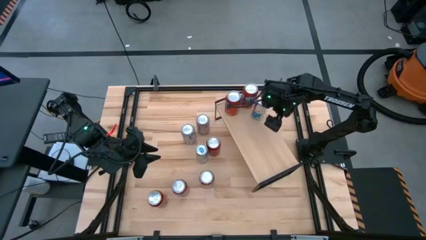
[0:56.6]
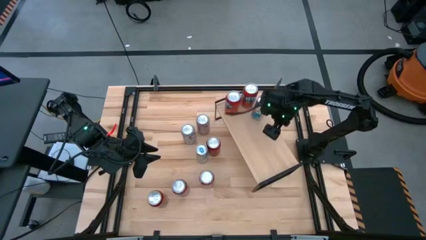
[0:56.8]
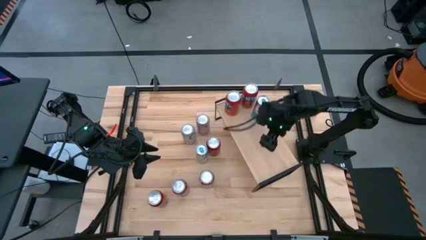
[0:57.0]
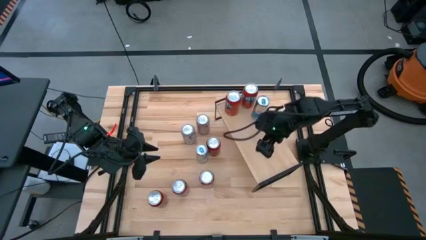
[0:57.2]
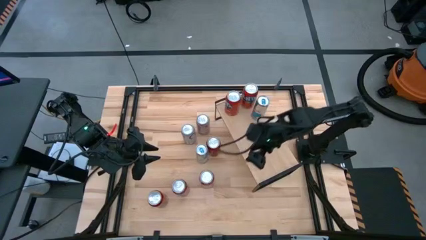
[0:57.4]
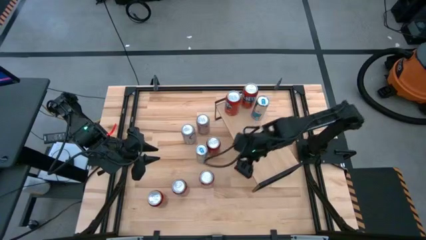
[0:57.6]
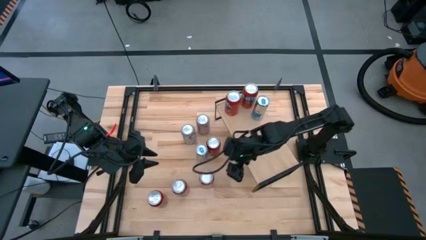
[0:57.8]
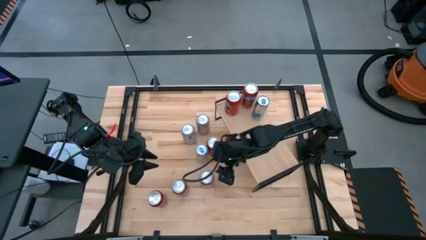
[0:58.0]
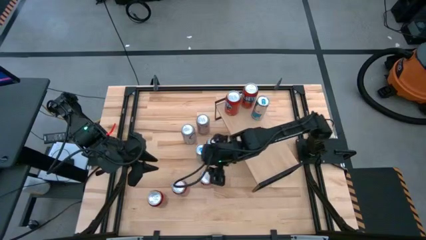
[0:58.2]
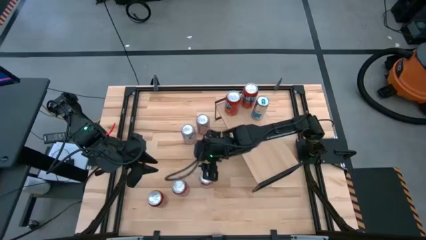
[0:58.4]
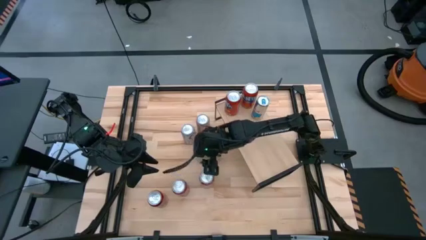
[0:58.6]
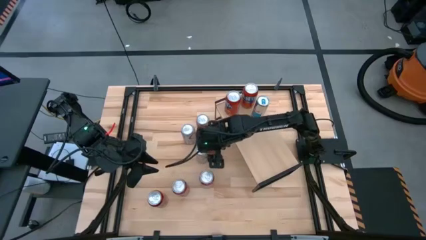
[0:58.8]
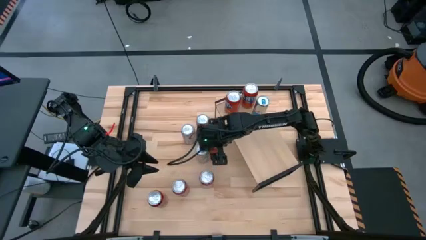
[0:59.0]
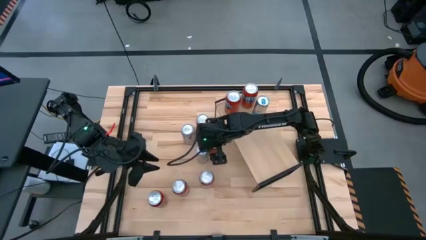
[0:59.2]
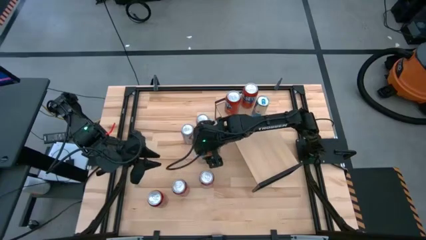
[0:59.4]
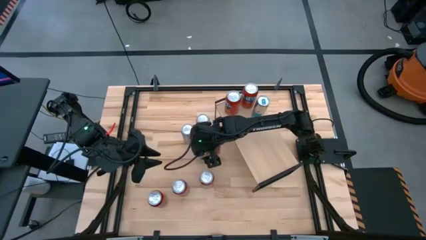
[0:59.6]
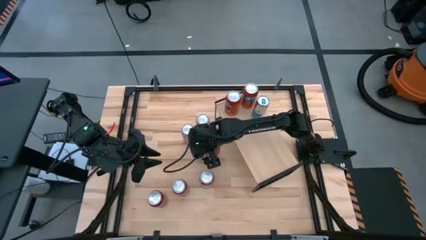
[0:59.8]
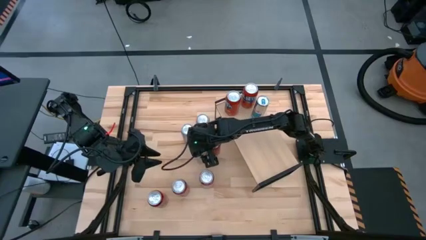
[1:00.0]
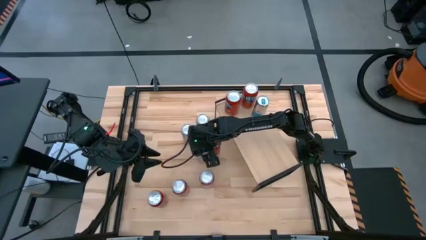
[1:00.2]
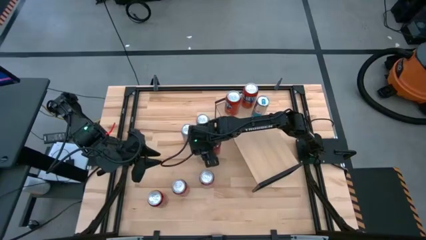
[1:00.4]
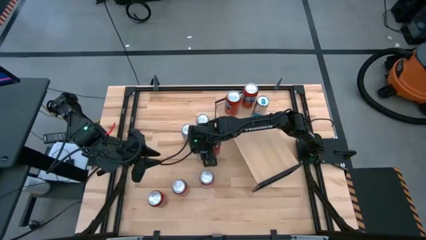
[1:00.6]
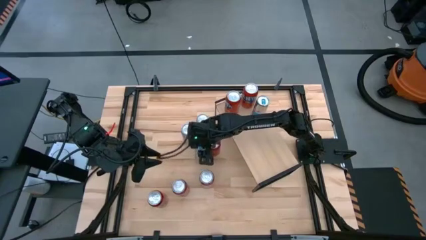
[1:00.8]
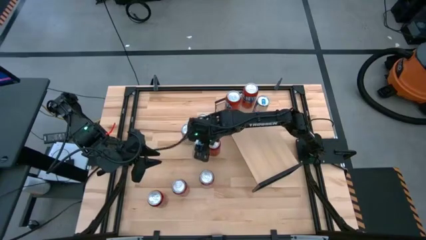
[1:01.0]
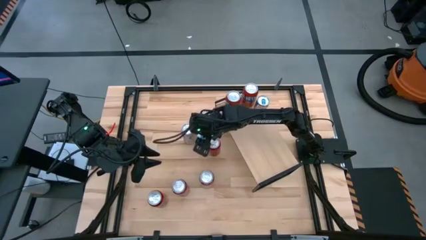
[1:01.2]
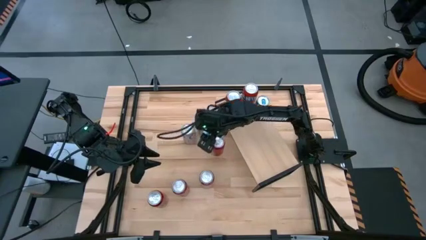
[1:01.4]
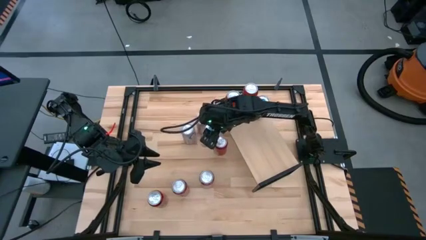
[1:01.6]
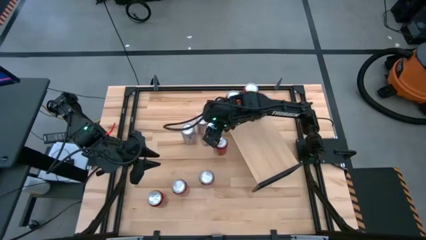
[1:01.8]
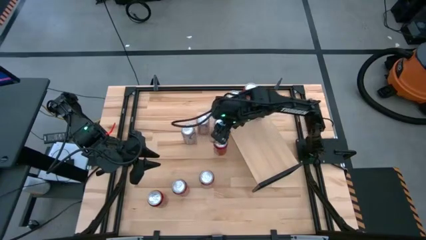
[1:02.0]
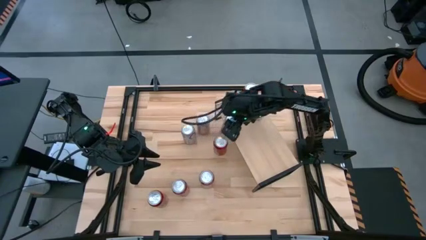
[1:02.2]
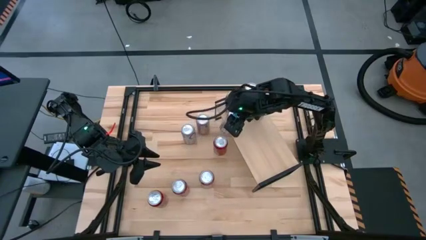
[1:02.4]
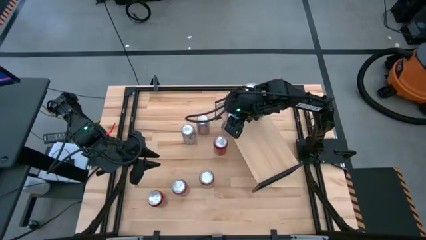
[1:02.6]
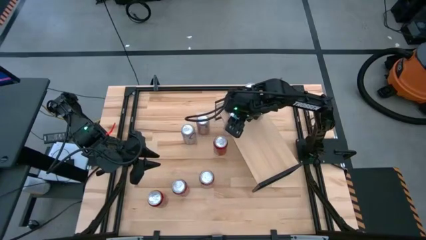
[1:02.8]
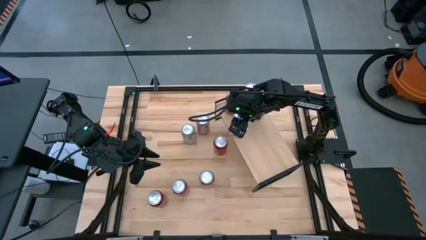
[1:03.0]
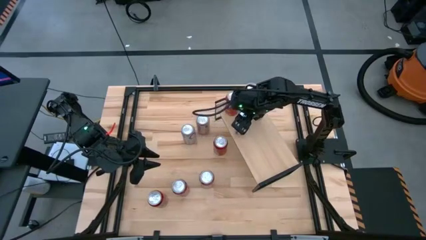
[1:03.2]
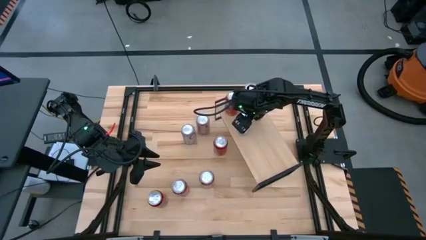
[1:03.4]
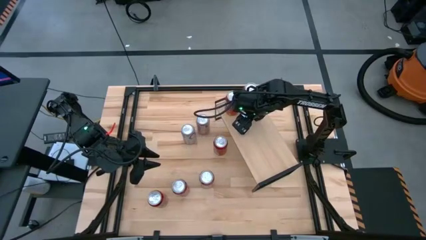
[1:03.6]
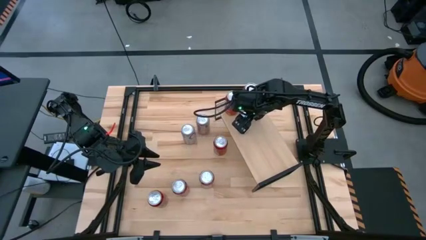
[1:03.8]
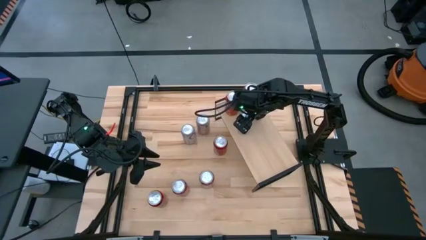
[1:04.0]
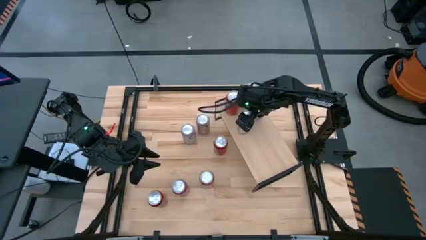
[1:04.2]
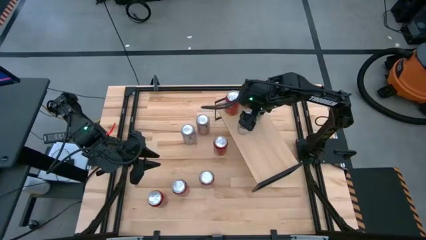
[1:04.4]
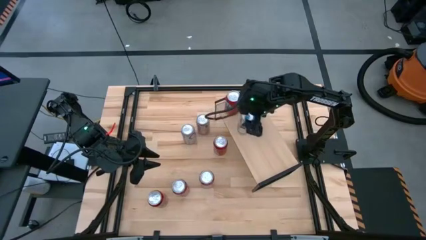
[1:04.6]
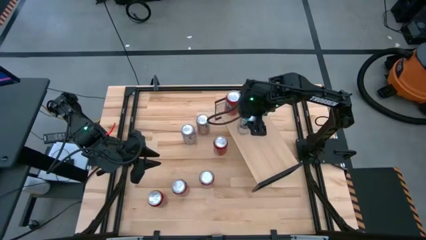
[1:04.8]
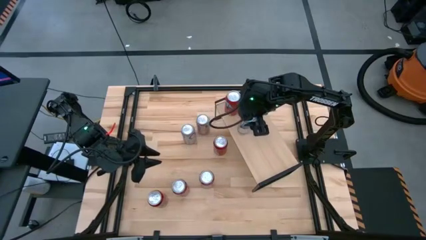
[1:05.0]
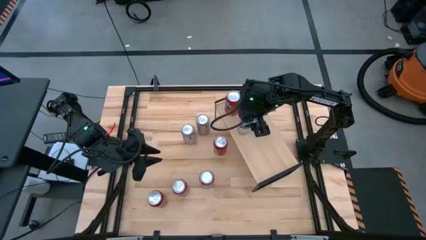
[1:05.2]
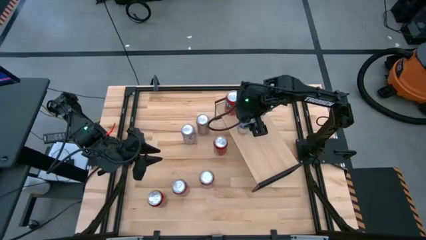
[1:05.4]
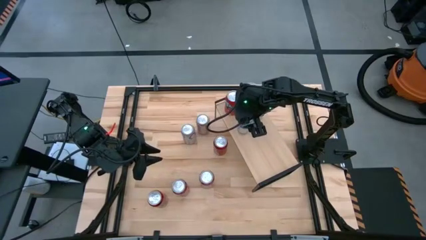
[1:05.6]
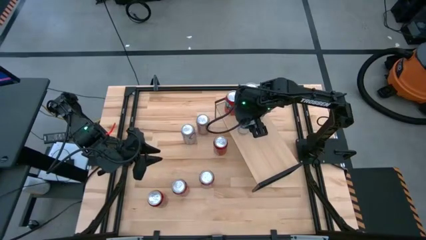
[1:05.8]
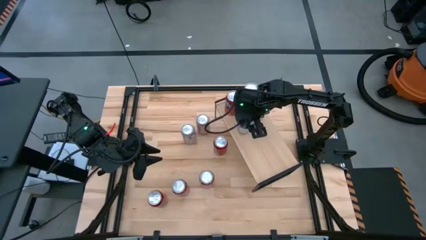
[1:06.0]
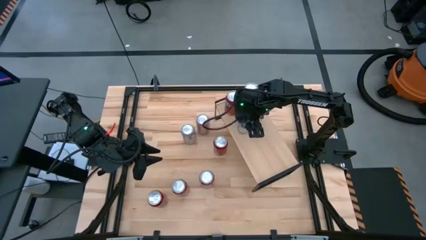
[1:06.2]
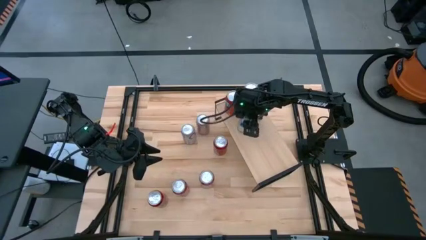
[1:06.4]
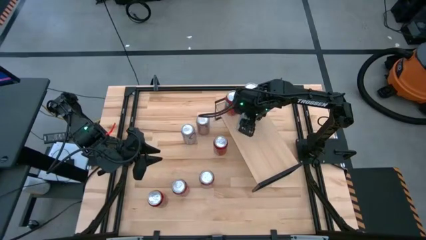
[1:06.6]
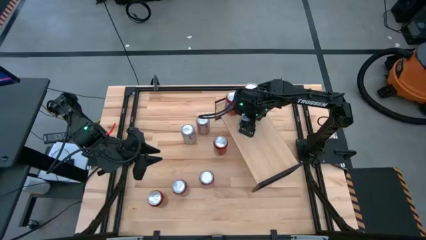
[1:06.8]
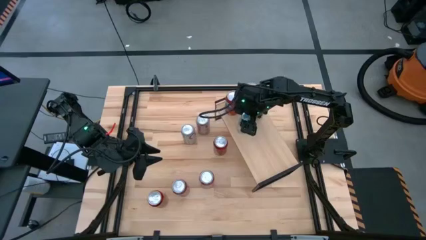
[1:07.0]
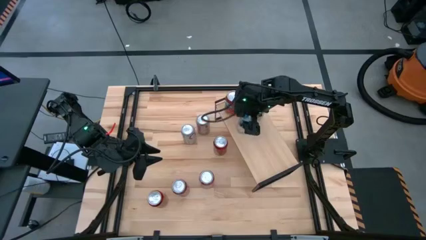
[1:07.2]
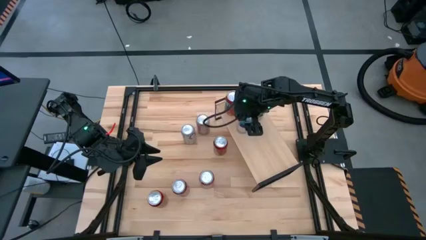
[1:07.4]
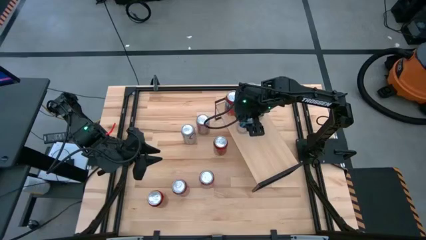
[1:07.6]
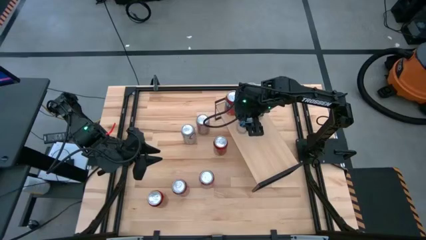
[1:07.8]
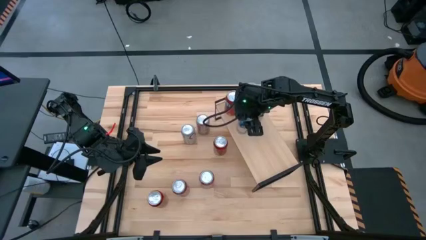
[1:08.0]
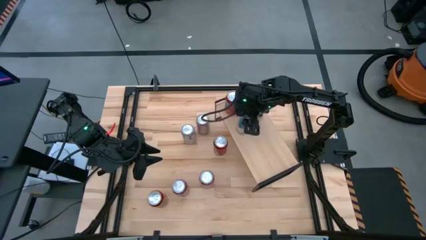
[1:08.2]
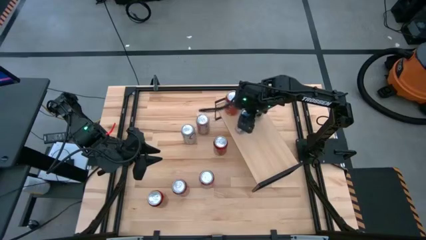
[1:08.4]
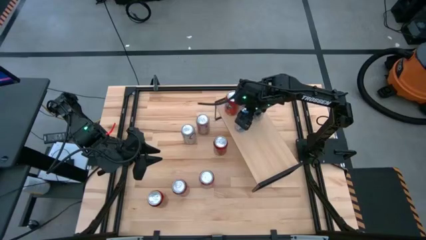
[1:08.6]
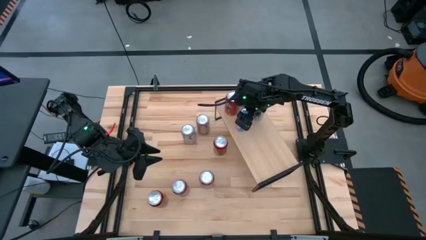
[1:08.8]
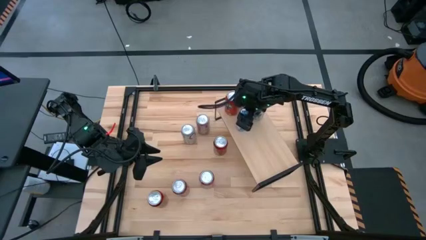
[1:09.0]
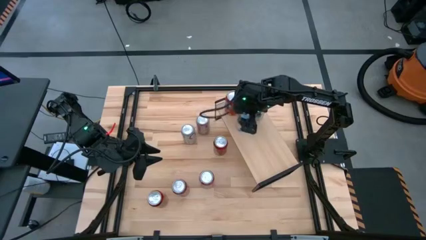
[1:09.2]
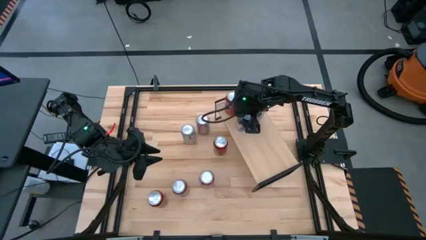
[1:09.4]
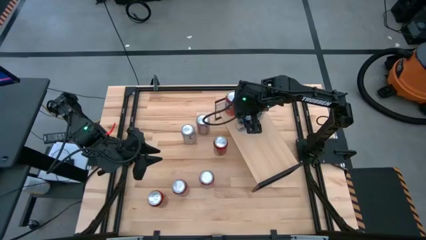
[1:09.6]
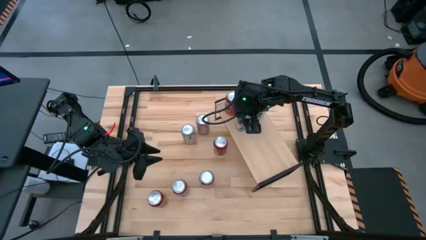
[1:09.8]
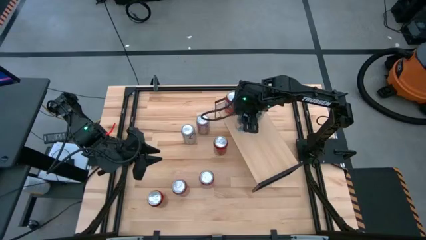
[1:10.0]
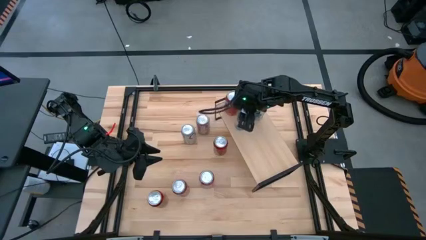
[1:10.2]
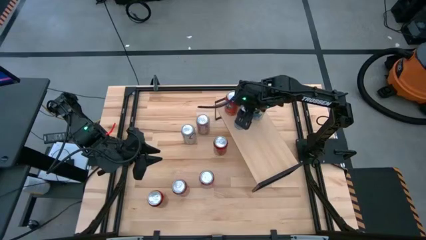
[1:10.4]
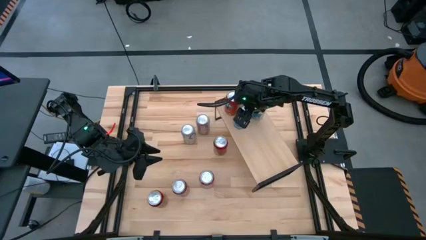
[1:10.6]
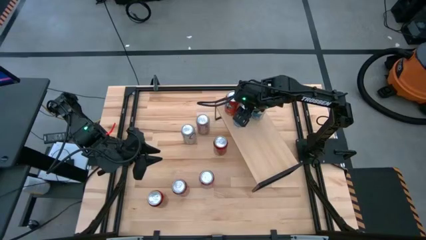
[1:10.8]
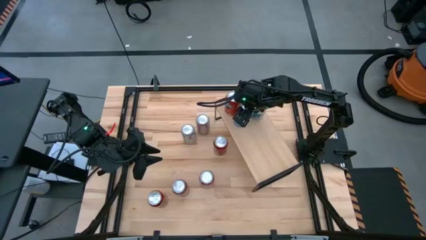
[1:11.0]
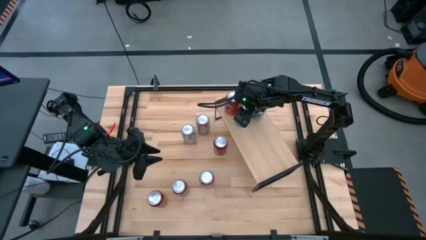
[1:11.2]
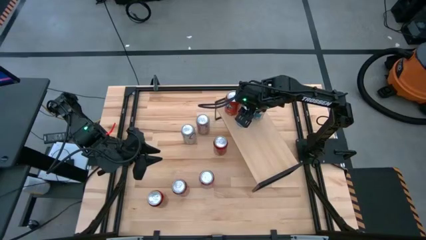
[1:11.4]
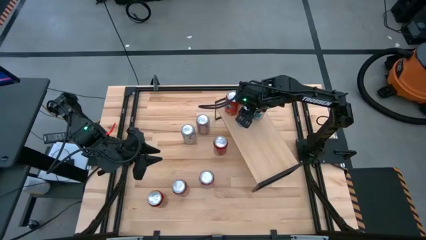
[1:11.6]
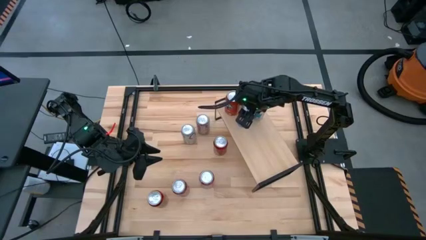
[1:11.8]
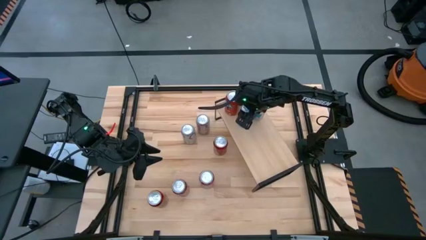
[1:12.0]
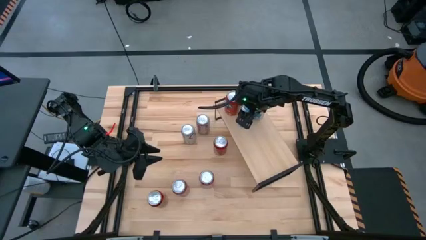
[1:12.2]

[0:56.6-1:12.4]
Task: Place canned beverage on shelf
Put the blue soda can aligned with the other blue soda can on the shelf
